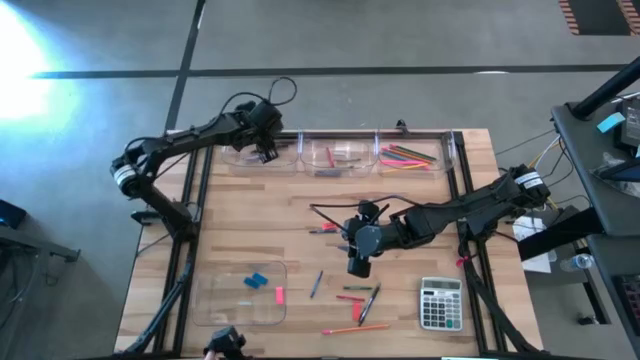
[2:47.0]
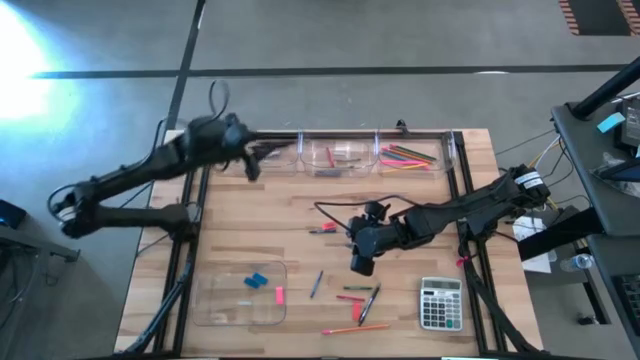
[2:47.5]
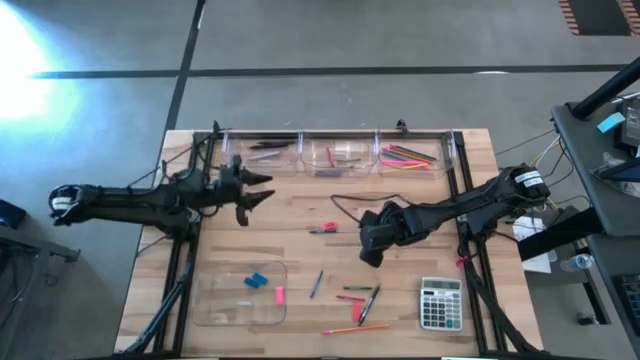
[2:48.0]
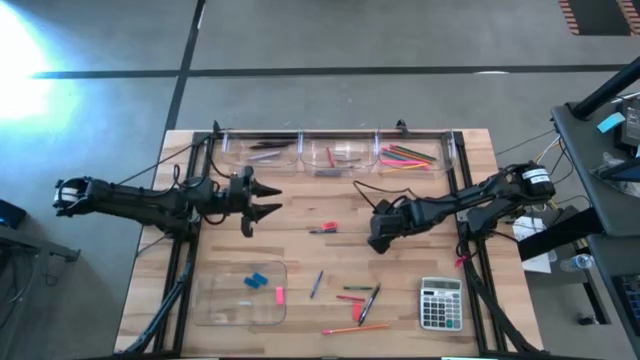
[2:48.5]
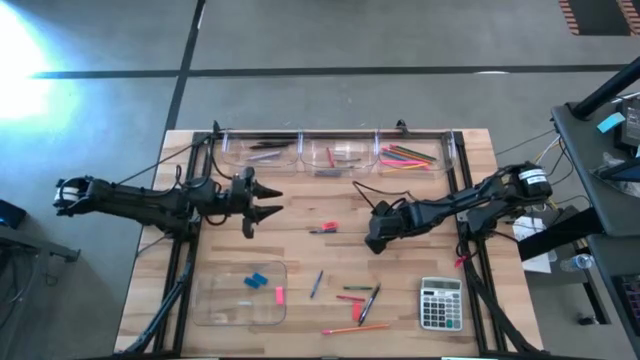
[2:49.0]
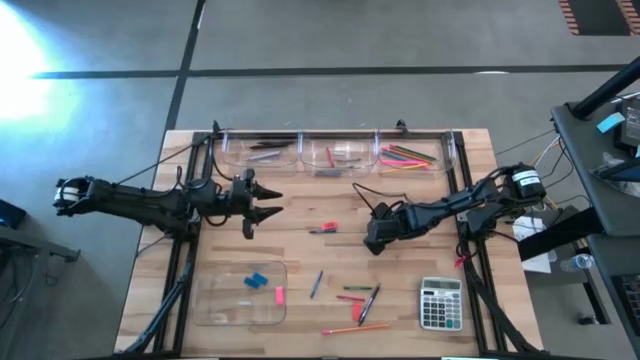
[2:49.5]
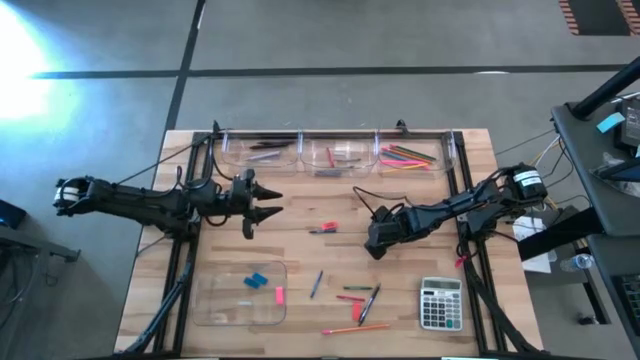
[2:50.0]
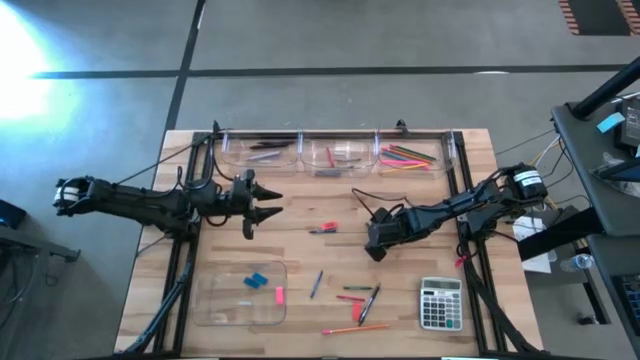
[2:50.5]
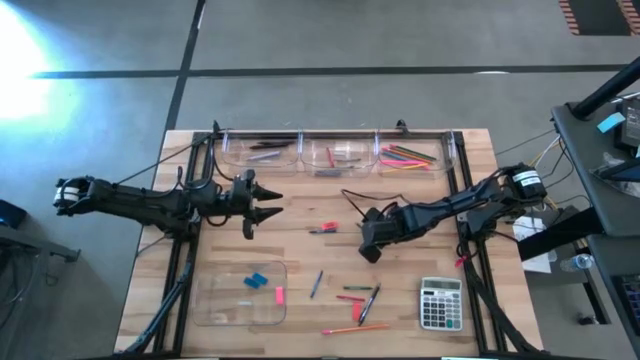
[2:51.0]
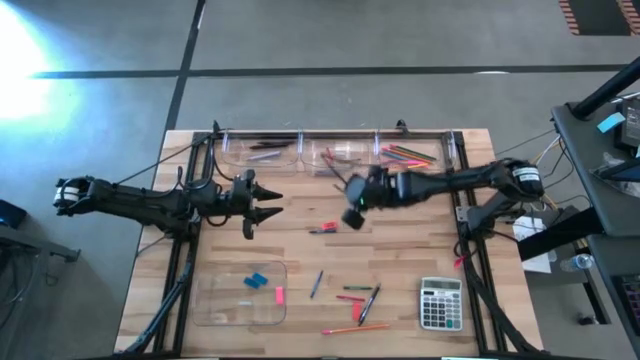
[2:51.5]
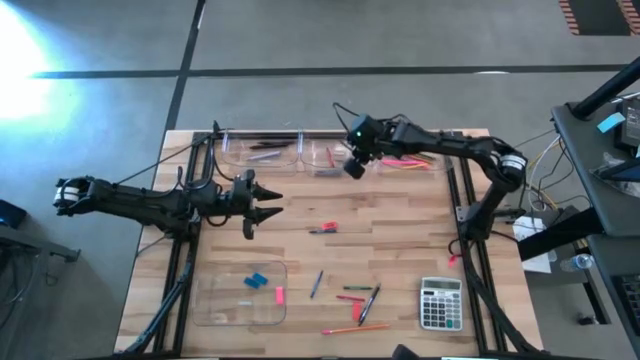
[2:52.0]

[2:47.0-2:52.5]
Task: Sort crayons/erasers/pens/pencils in bins
Put the dark green crayon into the top middle transparent bin

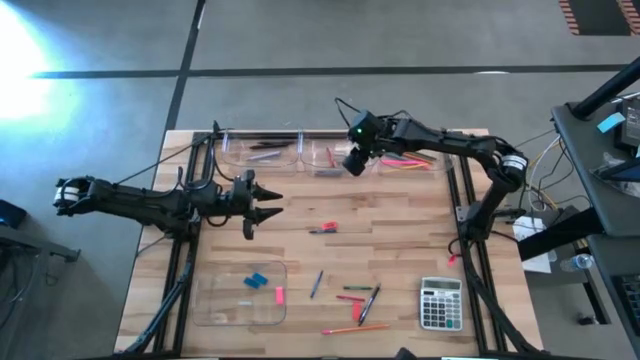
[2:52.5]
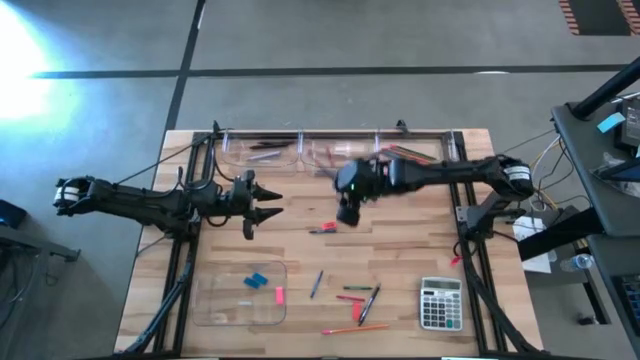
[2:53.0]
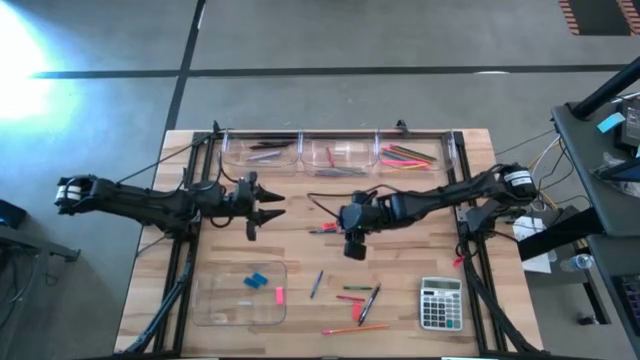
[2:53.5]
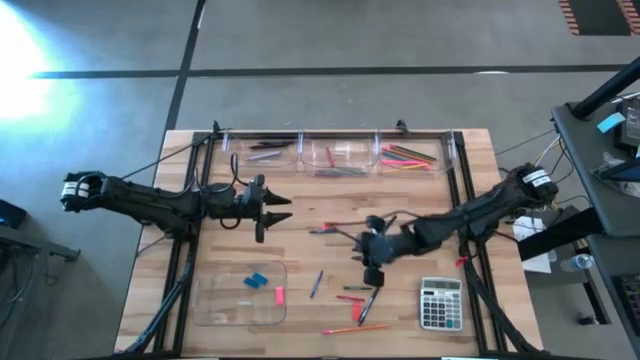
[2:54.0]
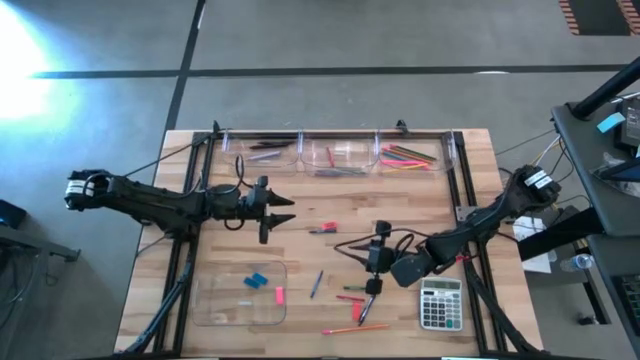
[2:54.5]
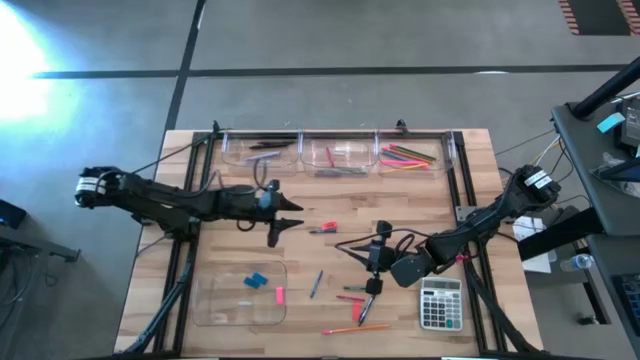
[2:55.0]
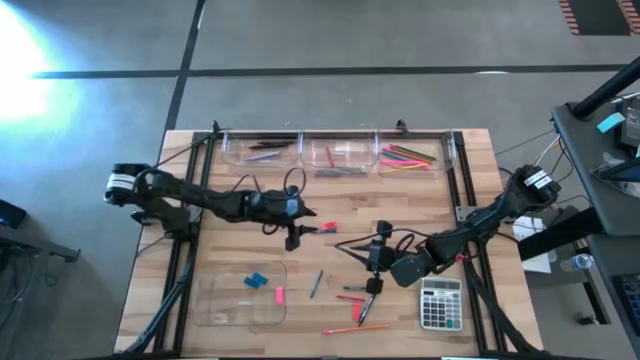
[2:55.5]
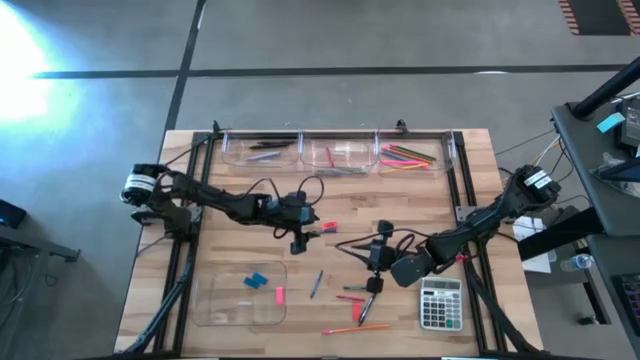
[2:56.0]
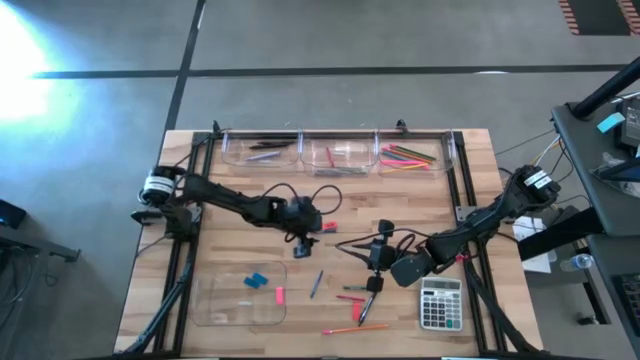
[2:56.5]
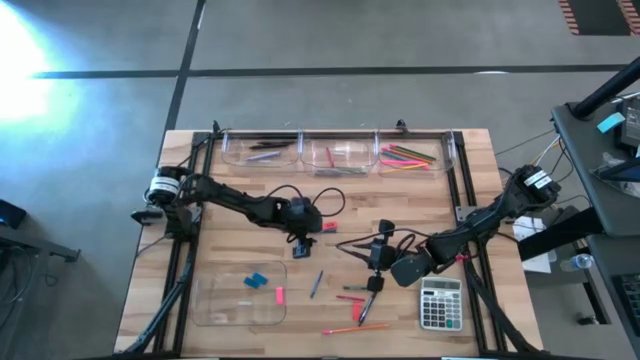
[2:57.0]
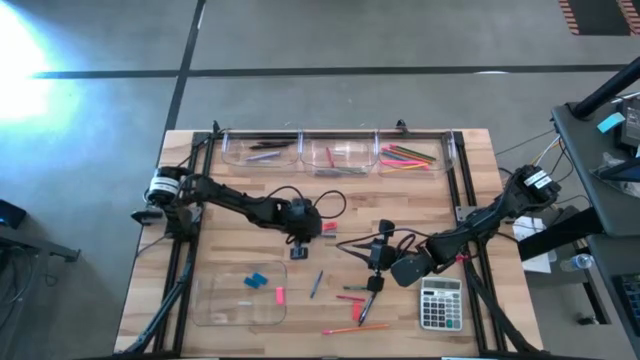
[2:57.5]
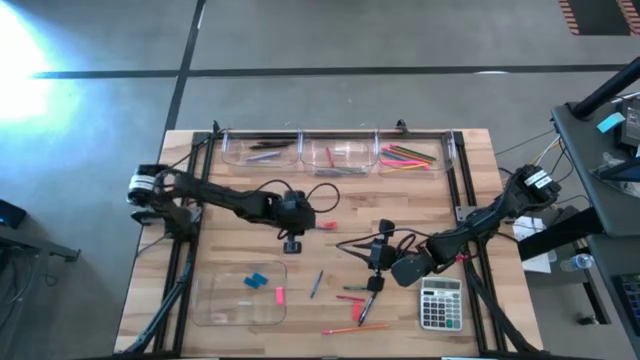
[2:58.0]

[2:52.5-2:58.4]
Put the blue crayon into the top middle transparent bin

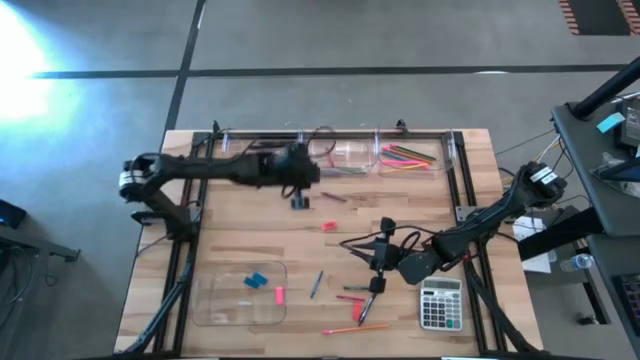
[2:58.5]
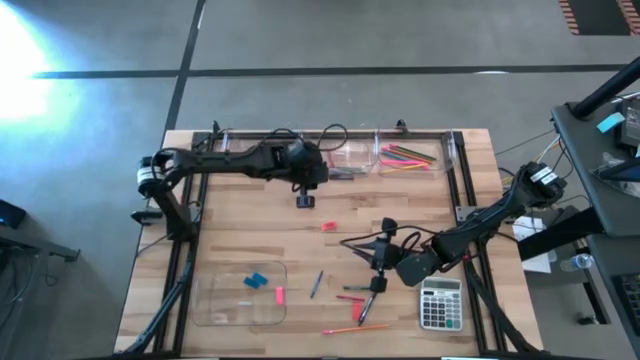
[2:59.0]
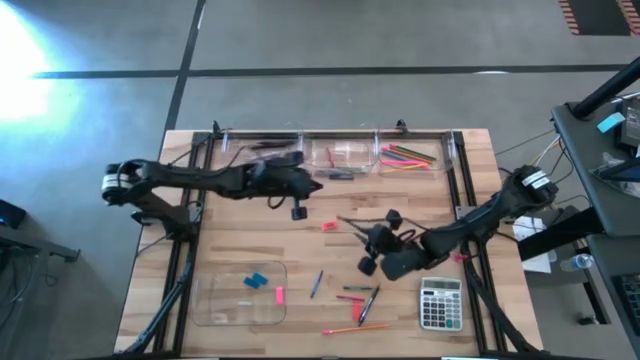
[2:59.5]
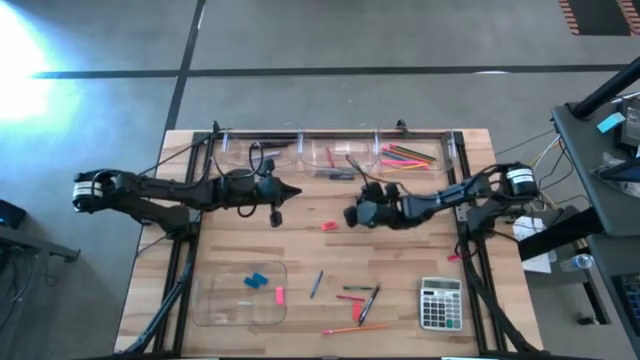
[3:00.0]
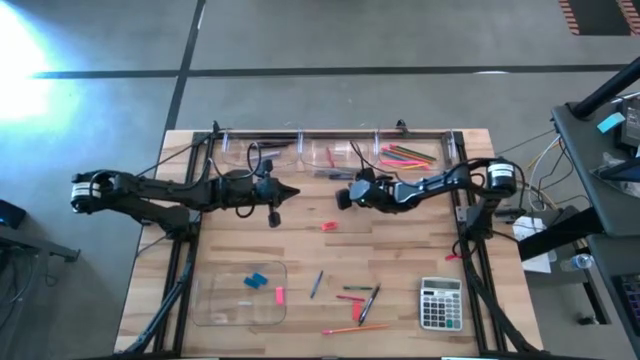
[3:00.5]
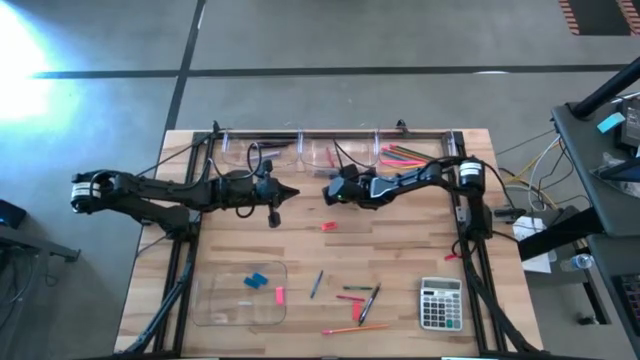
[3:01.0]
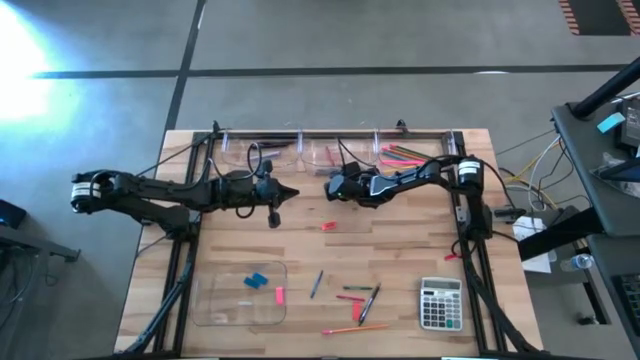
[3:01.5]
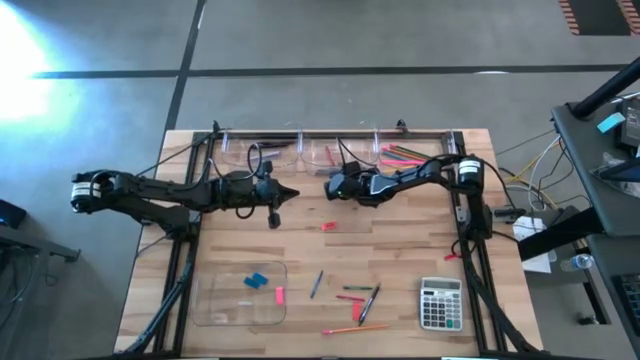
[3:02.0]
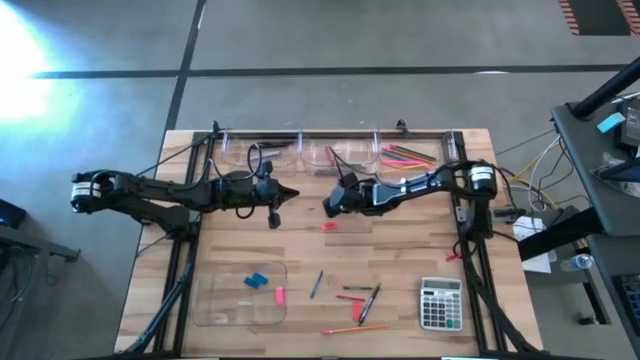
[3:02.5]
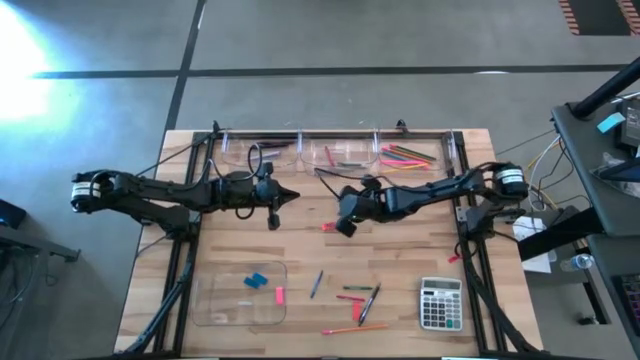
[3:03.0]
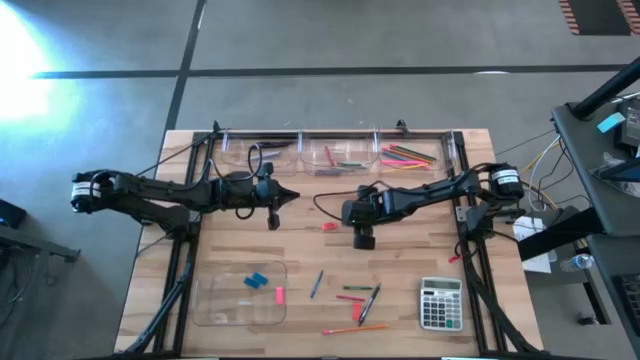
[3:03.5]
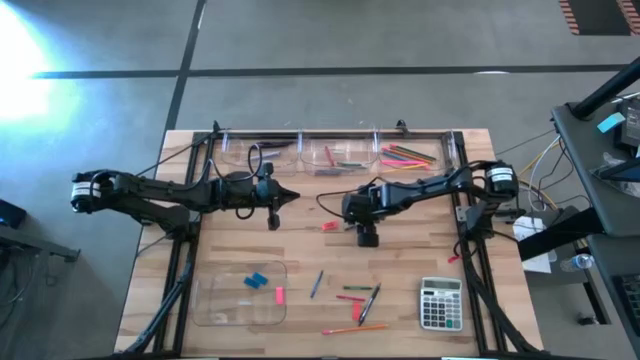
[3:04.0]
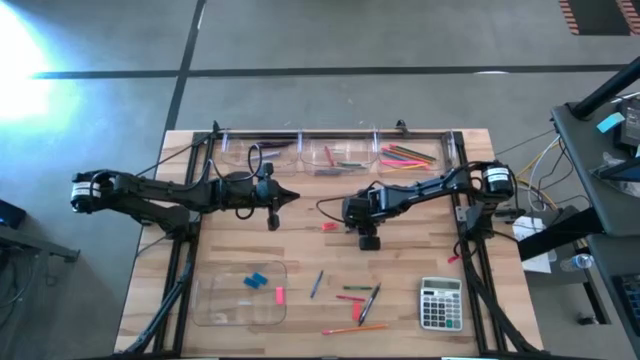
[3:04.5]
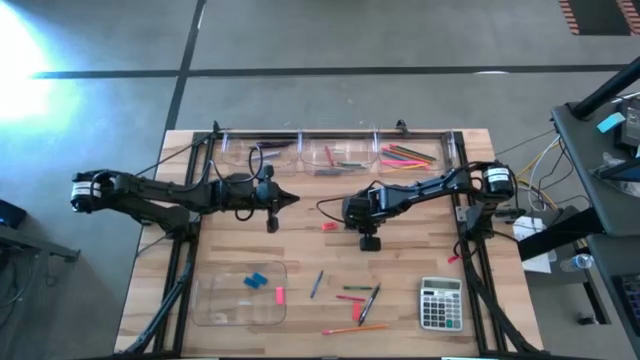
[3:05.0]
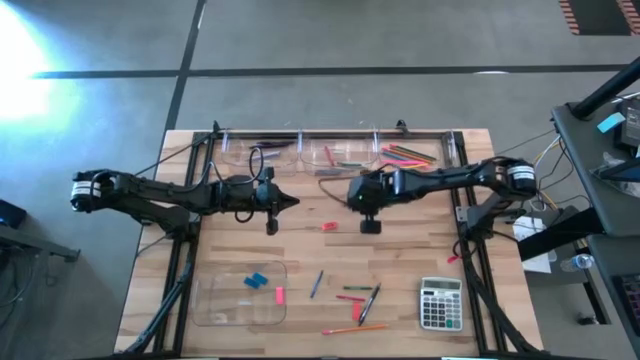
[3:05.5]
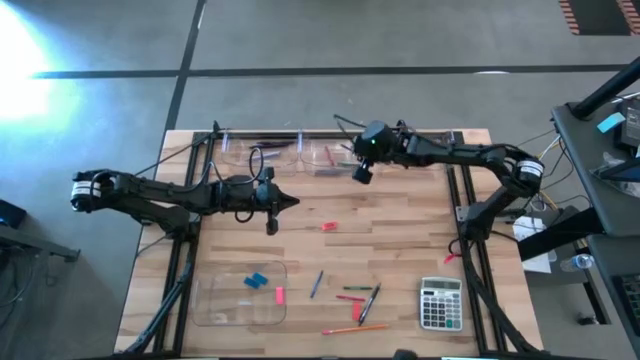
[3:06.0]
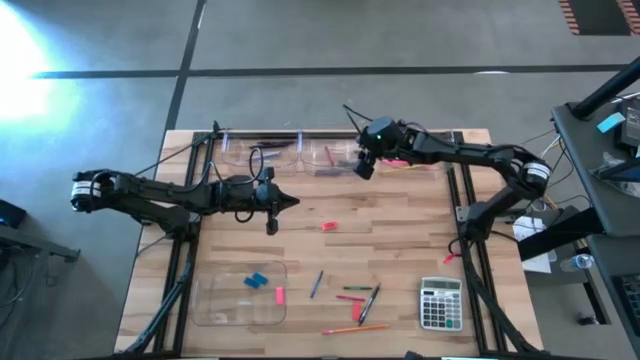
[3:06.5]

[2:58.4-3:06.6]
Put the blue crayon into the top middle transparent bin
